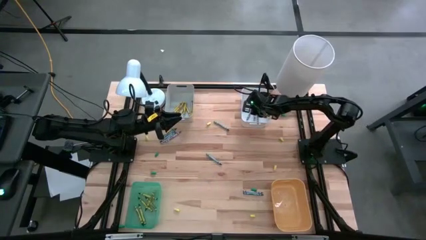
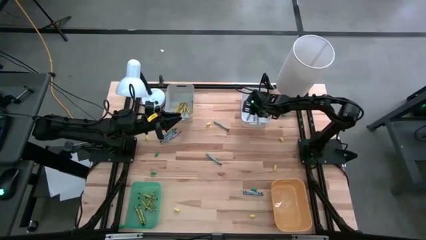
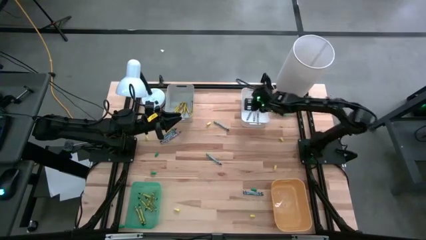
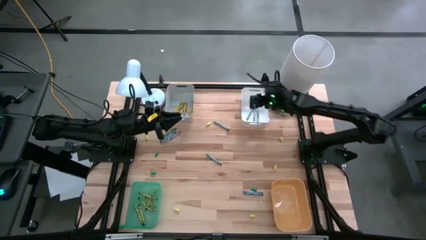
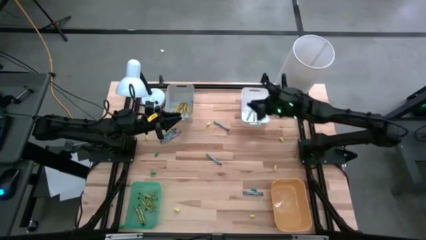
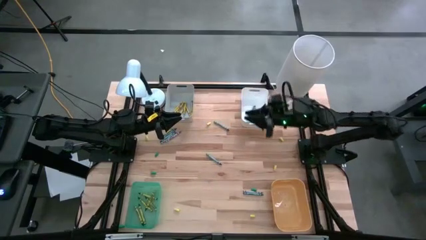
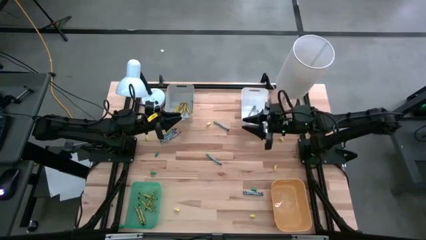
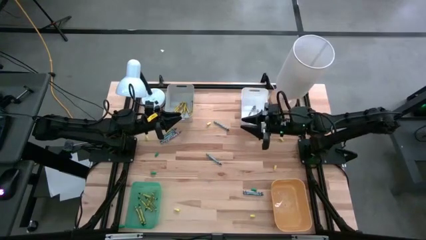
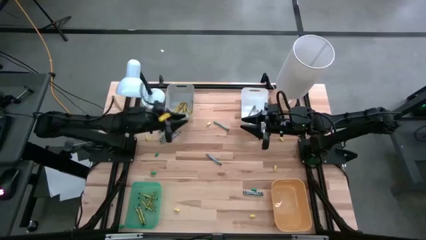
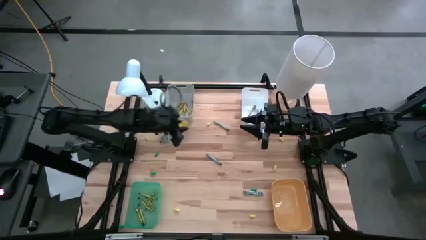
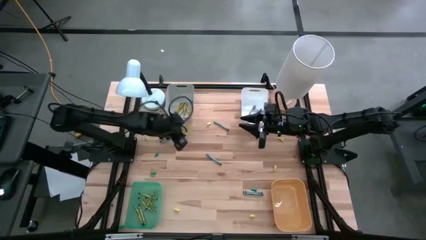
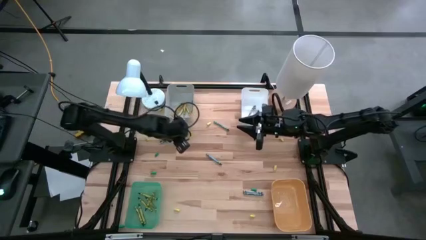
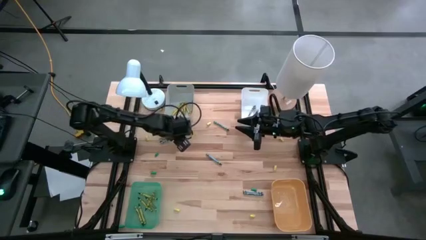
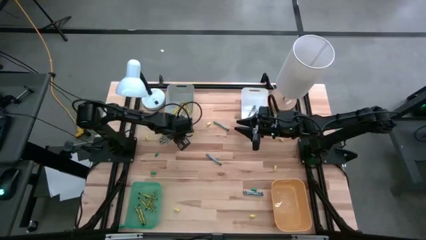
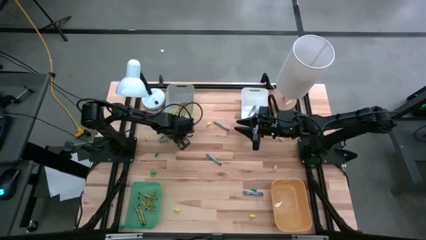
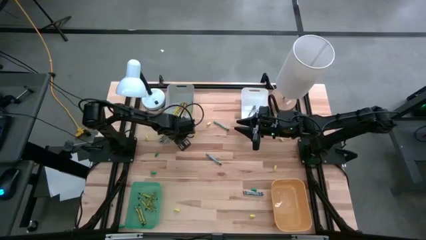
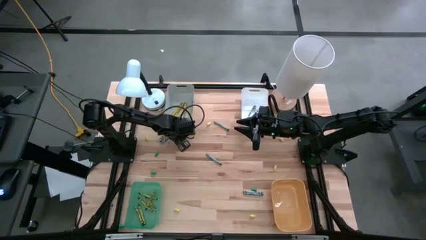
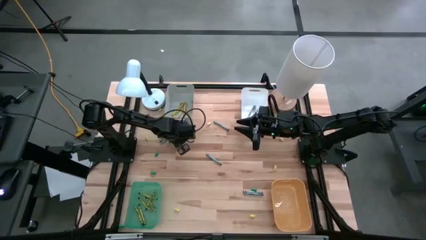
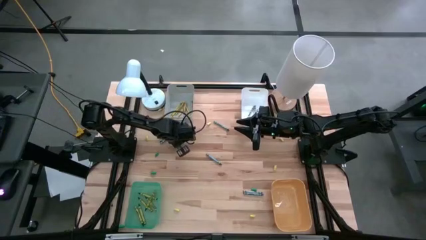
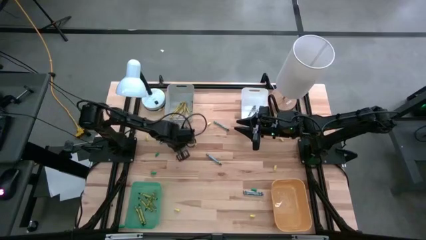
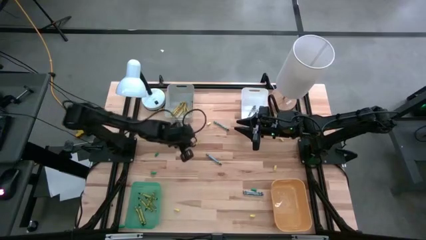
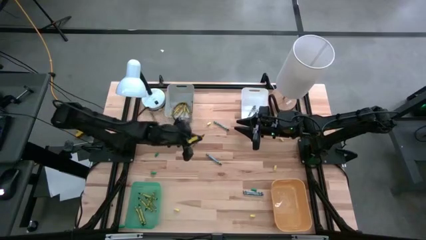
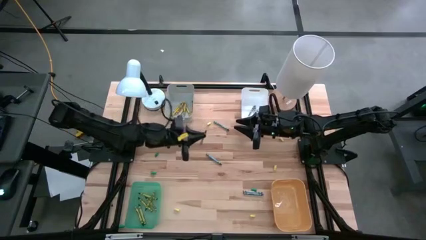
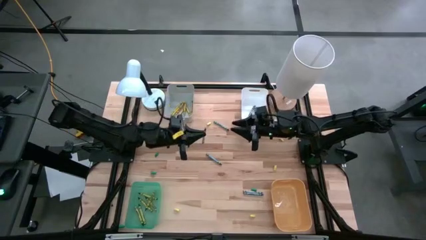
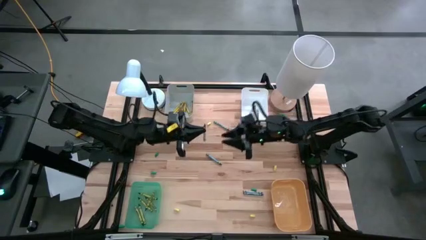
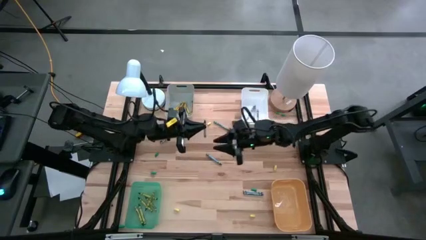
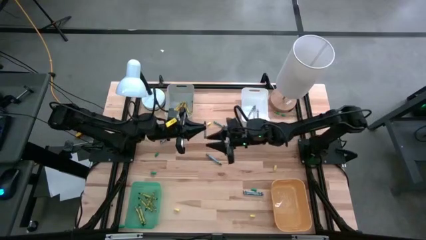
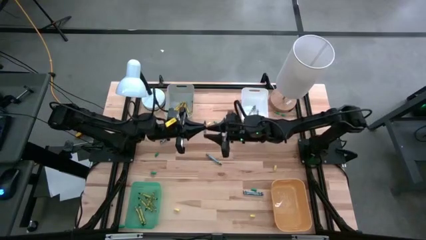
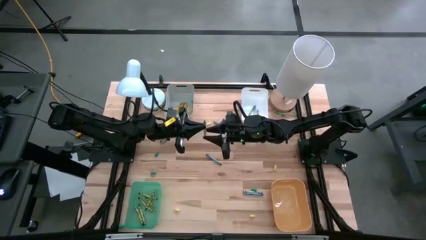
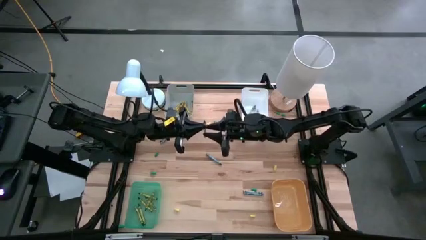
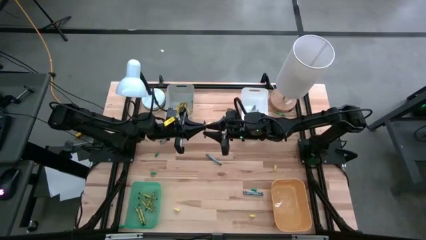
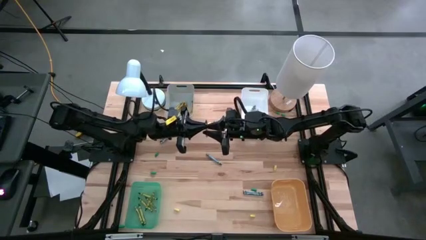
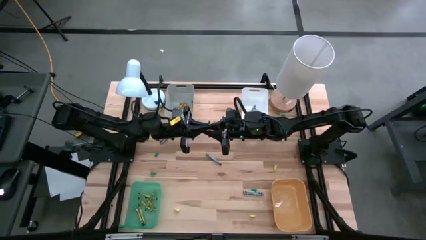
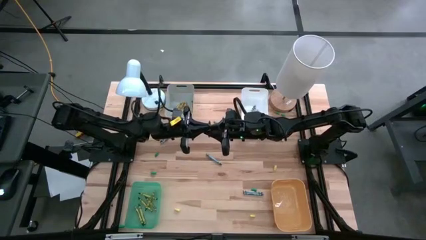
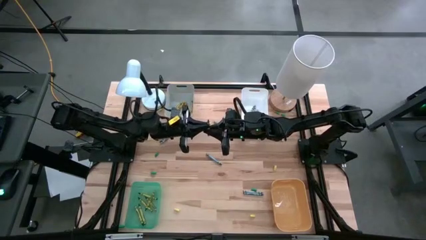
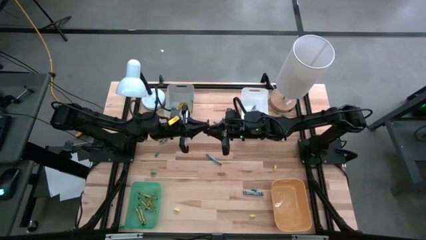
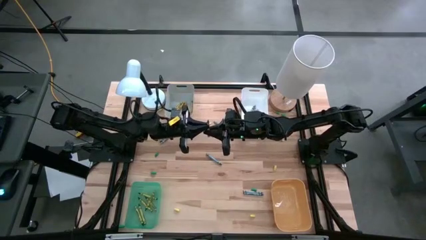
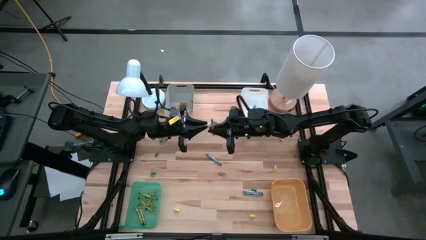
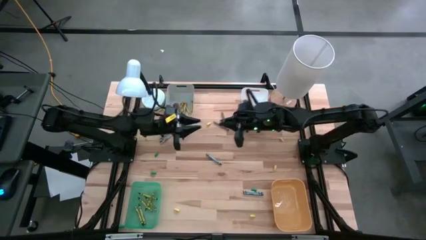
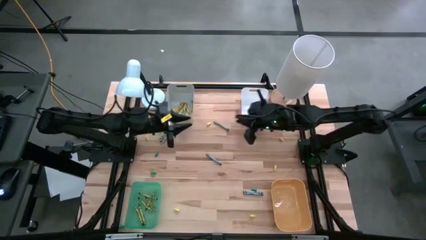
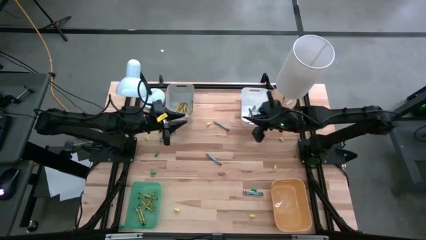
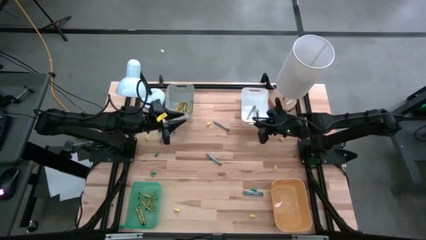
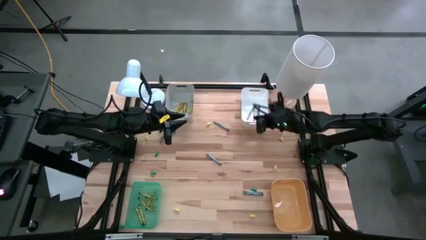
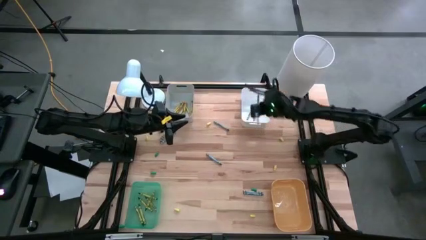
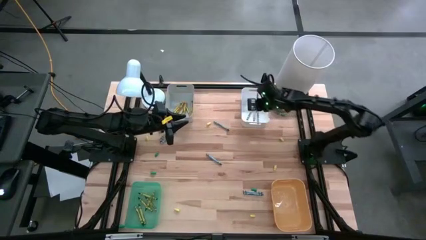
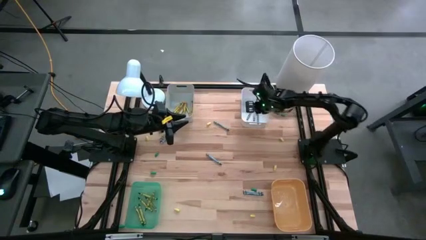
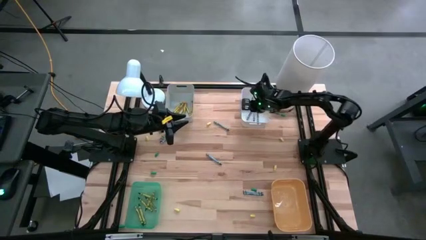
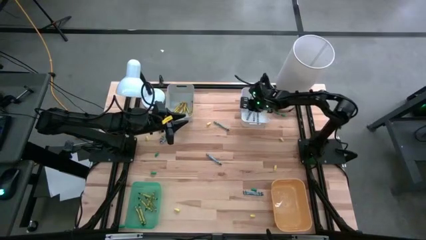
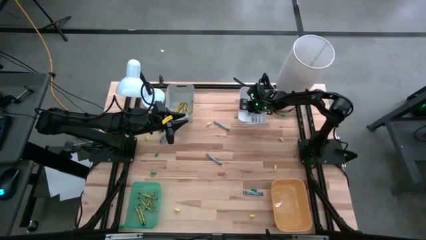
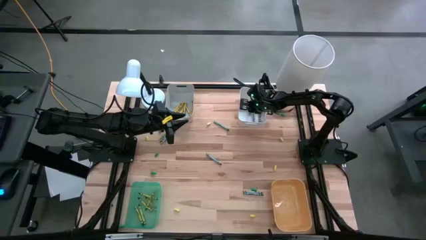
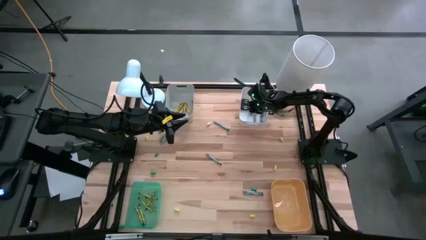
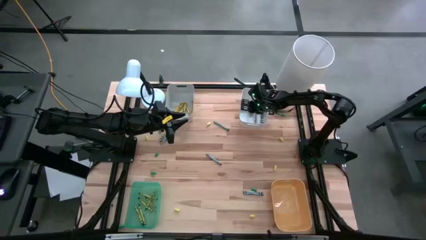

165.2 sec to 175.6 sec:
Task: Sort crayons
Put the gray crayon into the white bin
